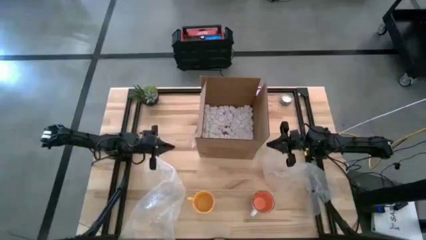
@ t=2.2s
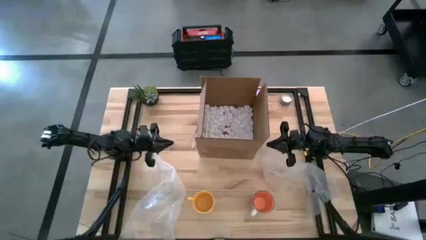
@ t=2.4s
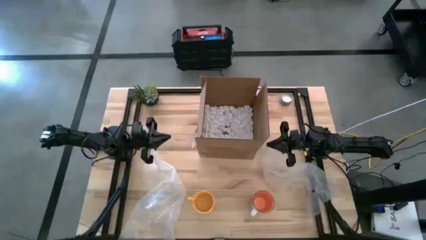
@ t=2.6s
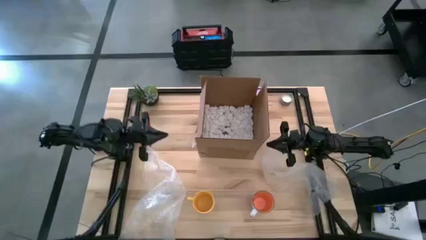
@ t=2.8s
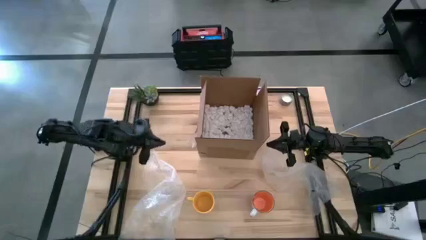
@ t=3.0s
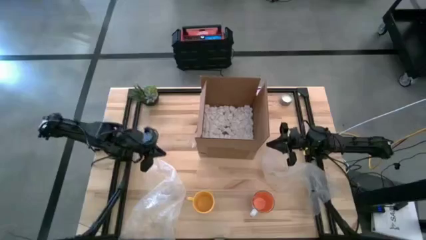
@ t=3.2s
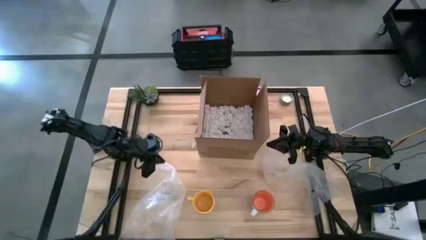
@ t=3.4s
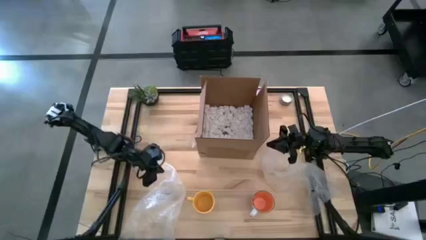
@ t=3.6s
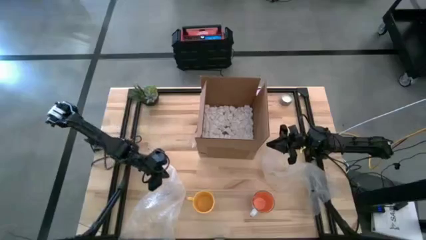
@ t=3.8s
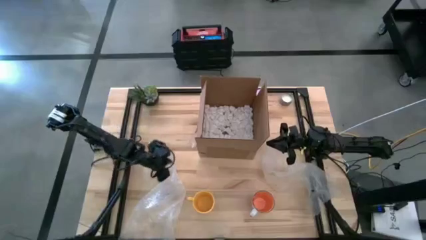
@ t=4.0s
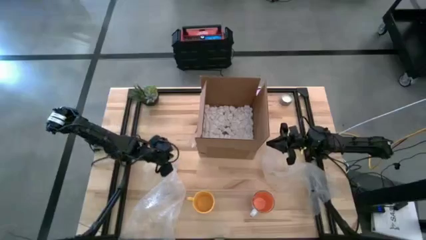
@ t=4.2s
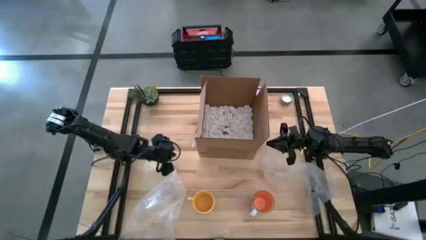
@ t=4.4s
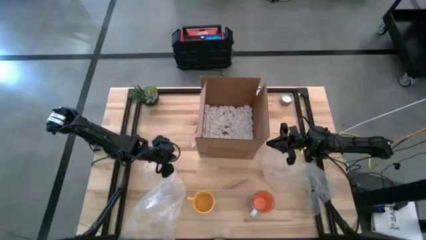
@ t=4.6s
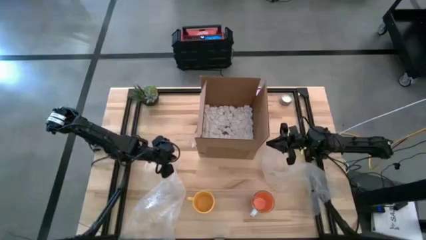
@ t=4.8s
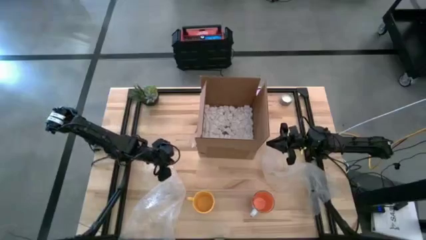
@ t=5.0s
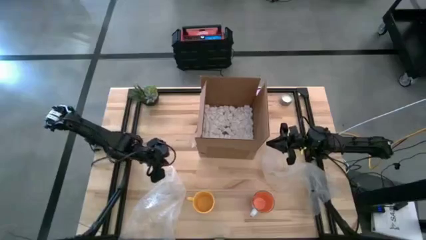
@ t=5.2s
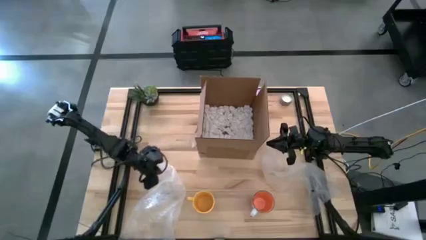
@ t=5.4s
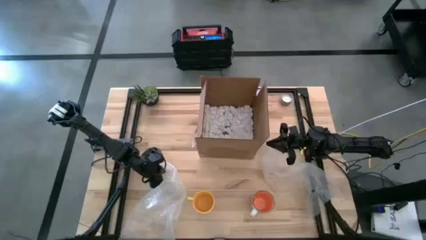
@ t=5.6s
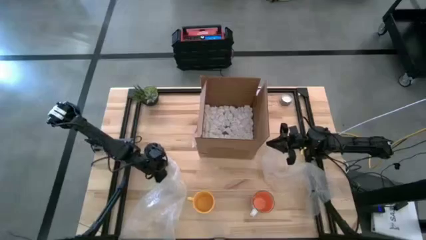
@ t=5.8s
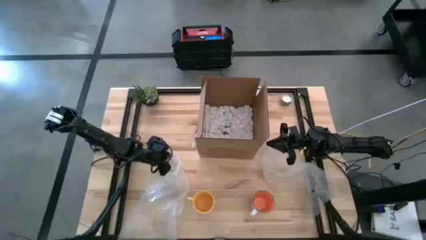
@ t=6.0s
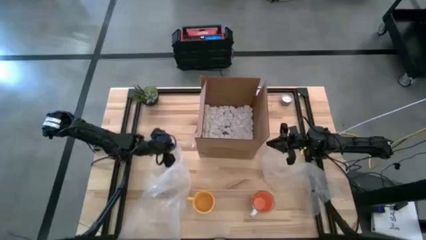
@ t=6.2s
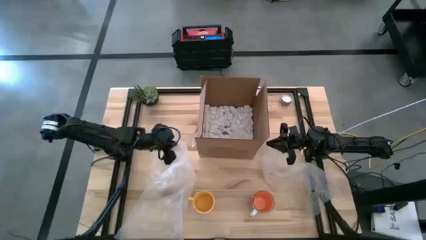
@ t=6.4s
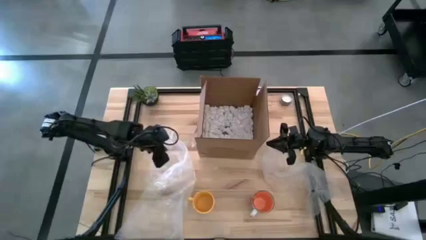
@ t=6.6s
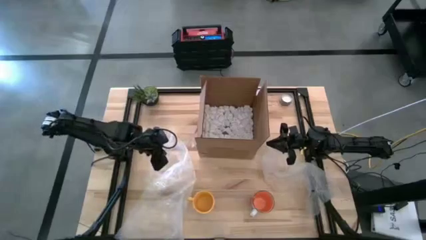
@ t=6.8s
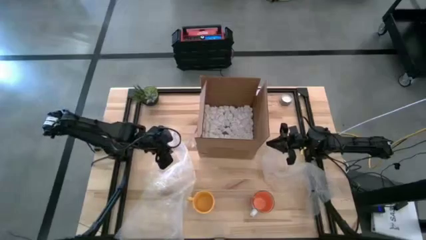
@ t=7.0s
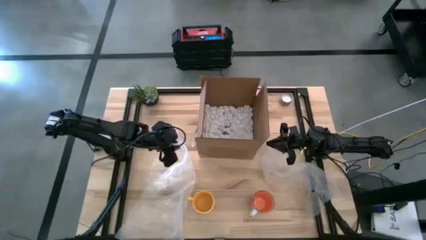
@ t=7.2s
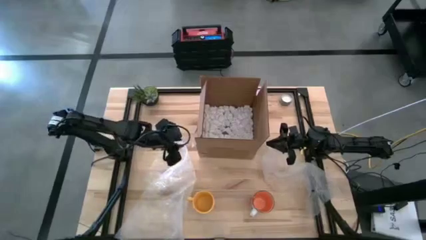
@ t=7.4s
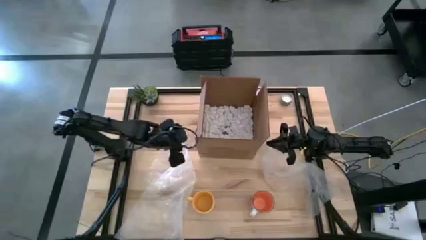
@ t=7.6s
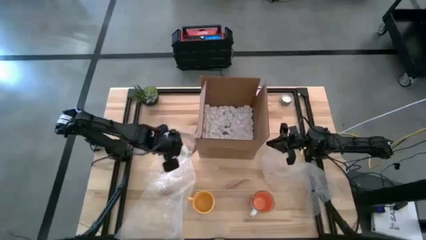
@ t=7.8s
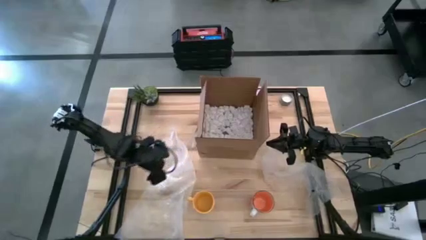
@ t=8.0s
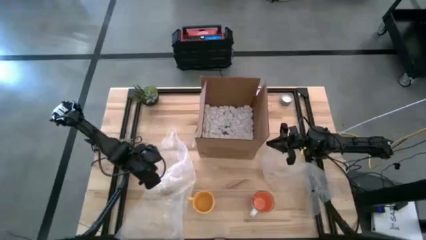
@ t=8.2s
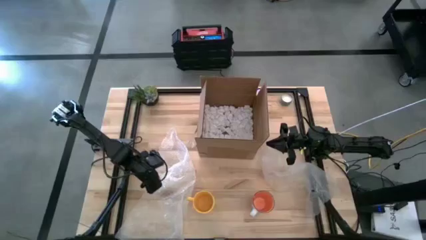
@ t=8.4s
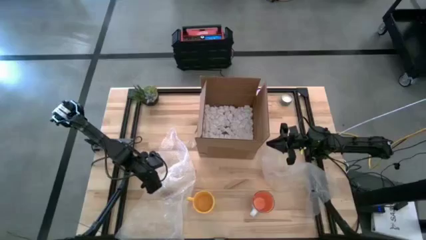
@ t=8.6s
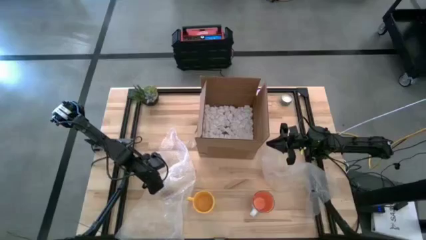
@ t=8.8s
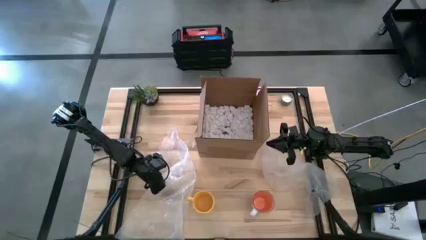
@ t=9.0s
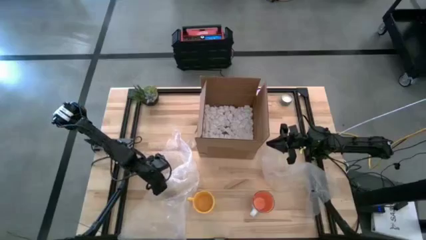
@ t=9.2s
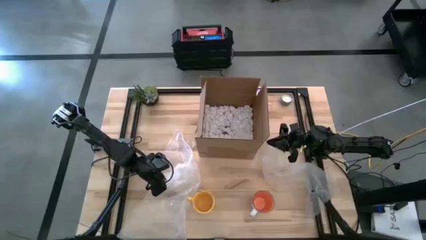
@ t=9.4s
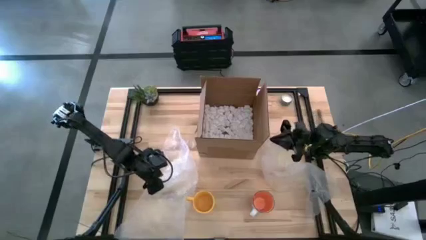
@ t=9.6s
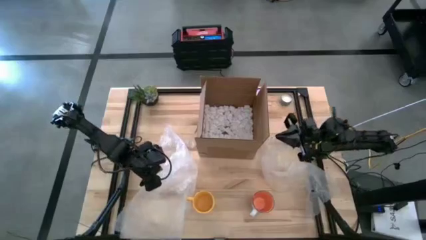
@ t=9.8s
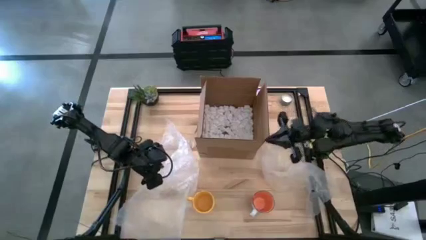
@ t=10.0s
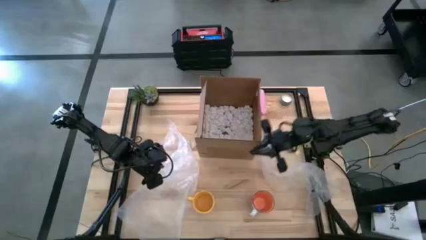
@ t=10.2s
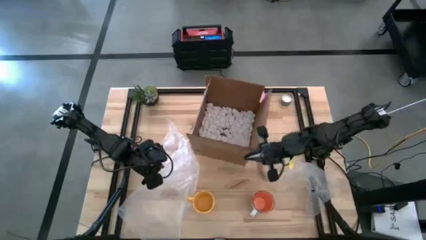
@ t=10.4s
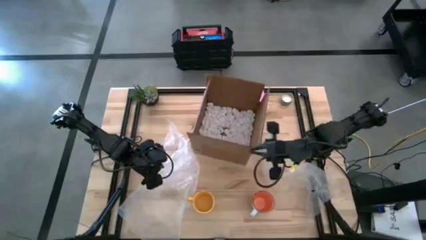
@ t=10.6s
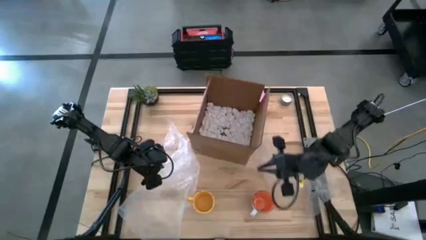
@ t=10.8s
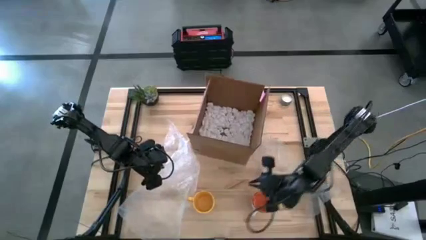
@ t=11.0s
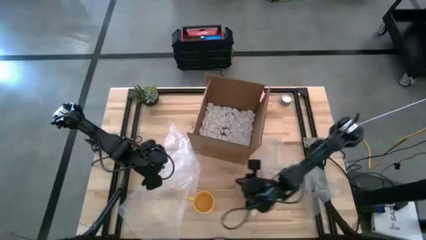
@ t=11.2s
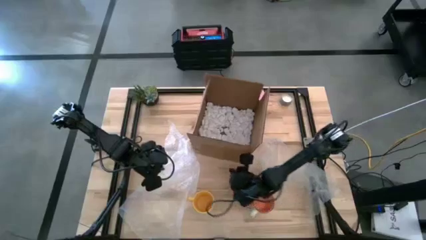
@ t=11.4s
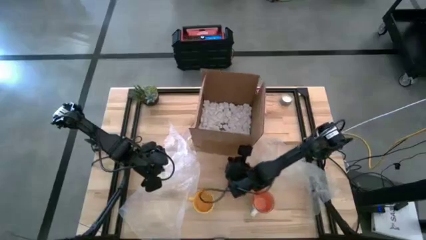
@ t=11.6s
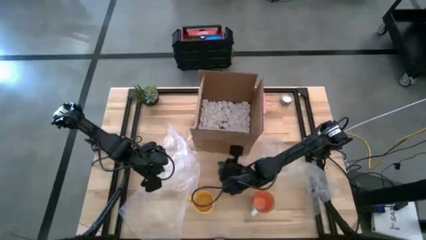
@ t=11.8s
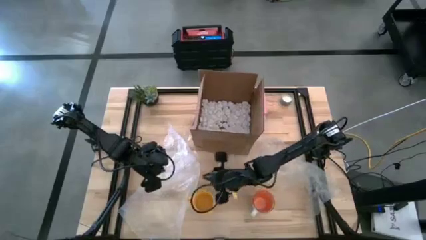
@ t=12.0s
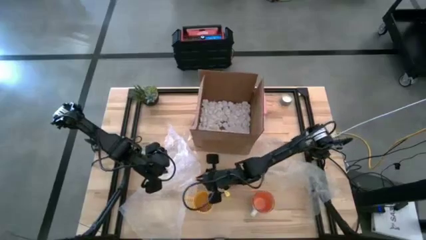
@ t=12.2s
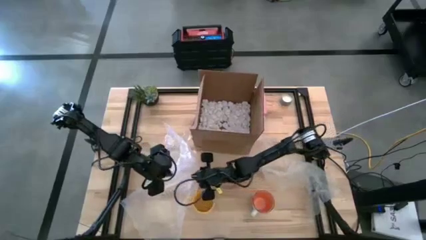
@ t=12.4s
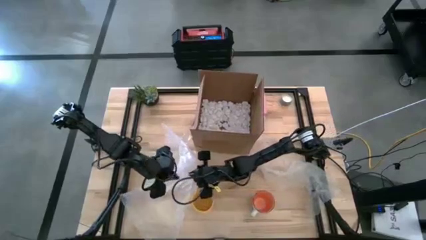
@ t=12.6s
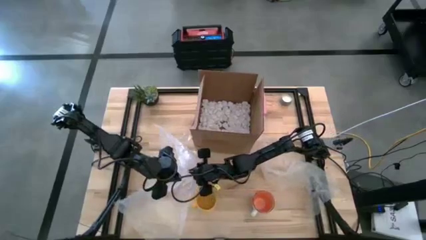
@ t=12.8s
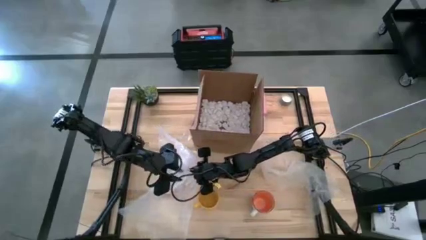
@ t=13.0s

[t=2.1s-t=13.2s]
Task: wrap mug
Adjust the bubble wrap

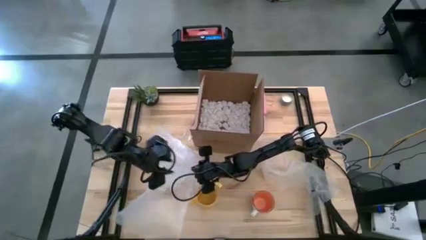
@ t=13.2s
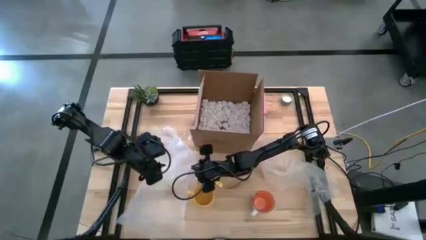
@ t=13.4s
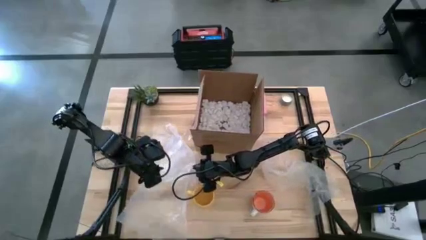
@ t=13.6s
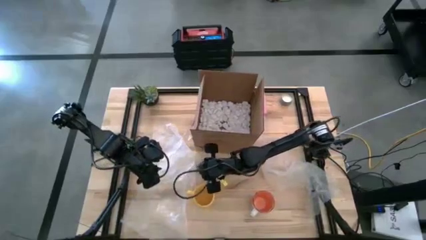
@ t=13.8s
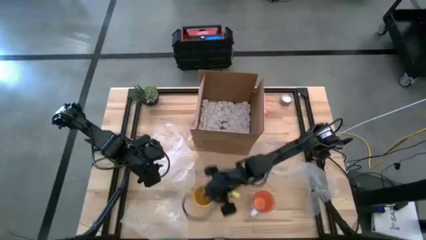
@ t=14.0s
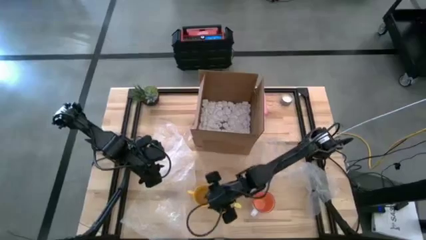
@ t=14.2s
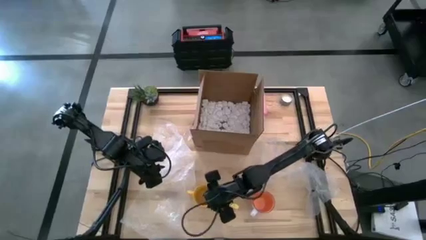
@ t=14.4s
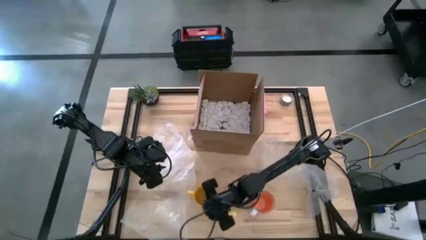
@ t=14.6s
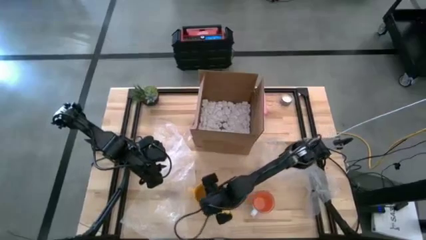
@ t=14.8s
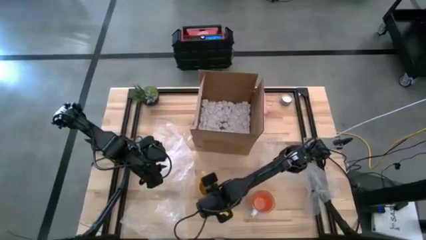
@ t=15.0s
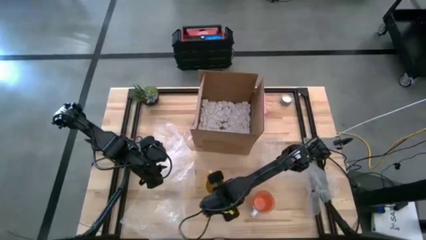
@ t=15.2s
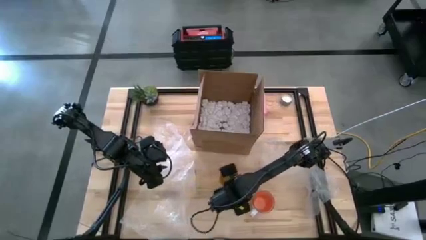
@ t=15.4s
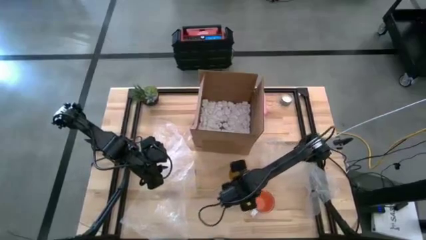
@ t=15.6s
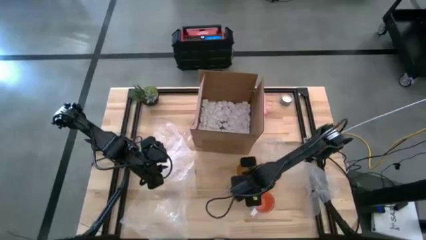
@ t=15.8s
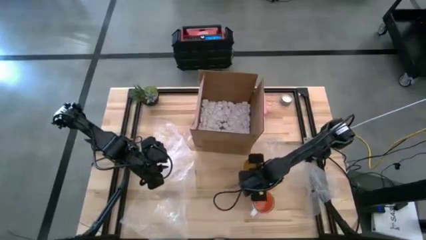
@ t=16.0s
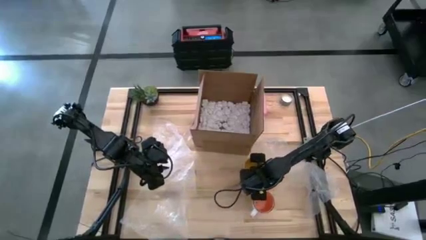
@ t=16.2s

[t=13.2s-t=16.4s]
Move the yellow mug to the middle right of the table
